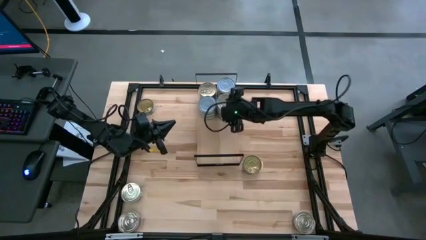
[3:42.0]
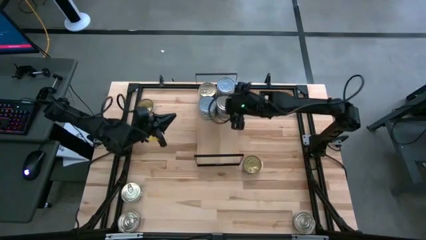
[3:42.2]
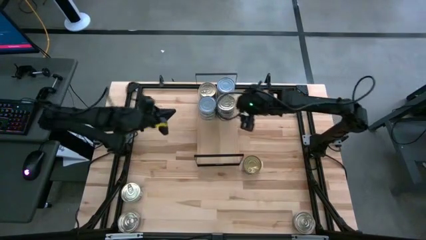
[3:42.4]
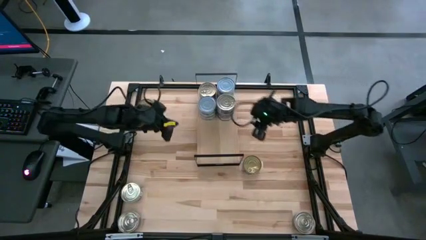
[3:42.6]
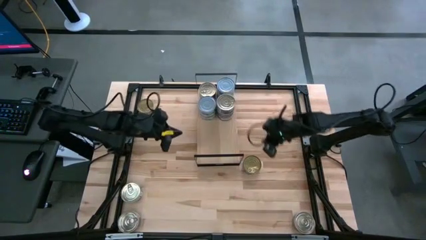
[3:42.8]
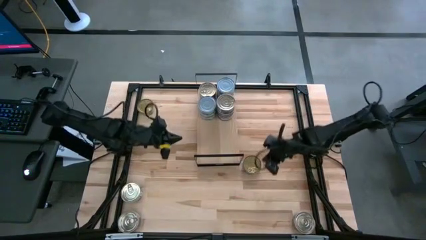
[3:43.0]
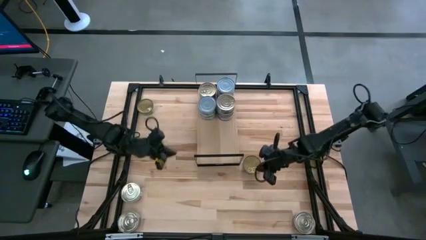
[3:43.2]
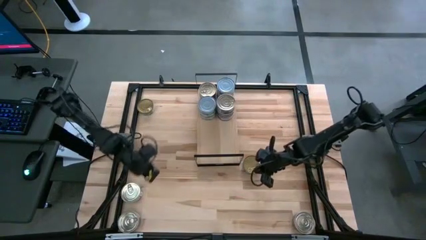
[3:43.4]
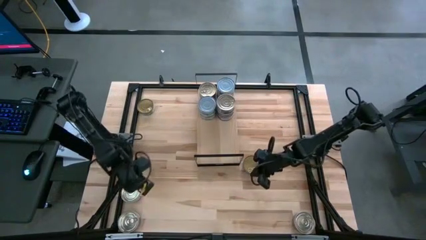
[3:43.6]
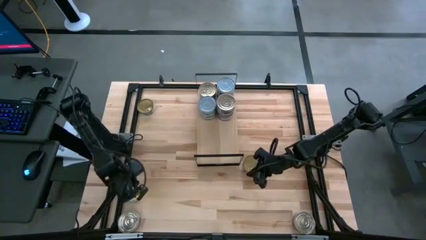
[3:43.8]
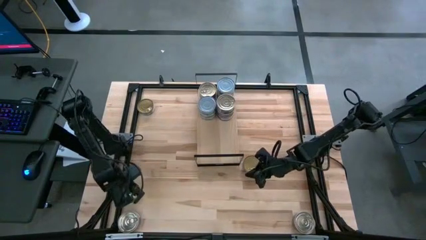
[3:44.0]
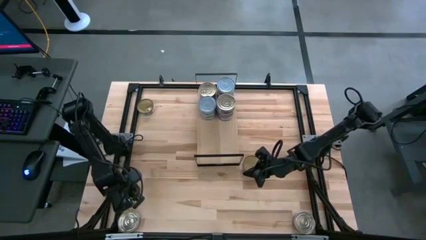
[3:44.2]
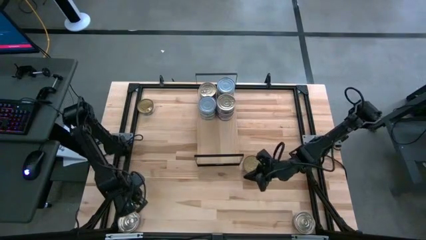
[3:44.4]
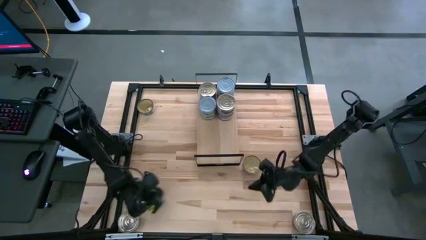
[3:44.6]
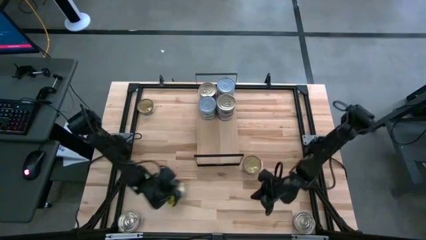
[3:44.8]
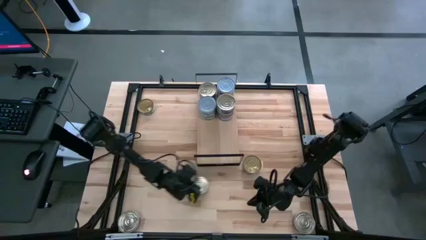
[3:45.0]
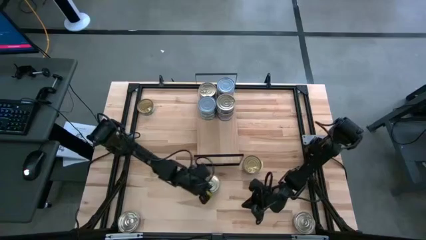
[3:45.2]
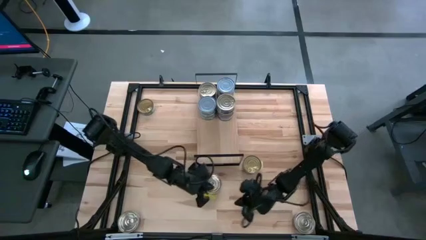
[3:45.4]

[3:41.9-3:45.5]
Task: Stack canned seafood by type on shelf
Move the green tuna can to the bottom middle of the table

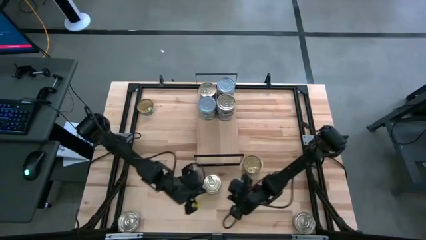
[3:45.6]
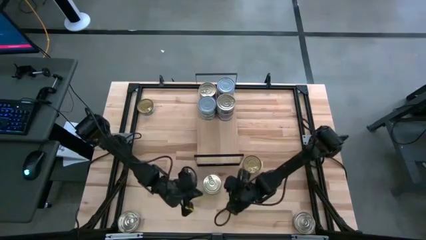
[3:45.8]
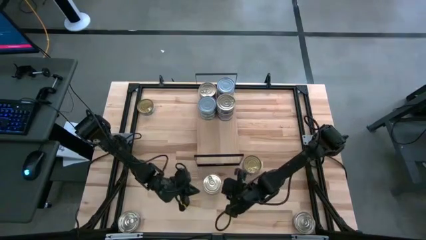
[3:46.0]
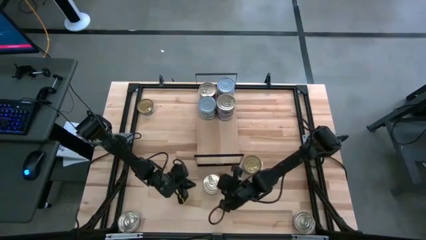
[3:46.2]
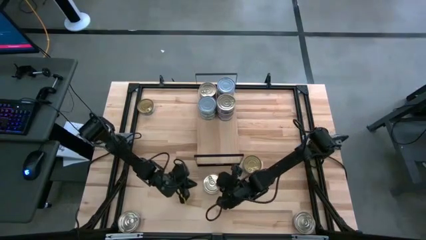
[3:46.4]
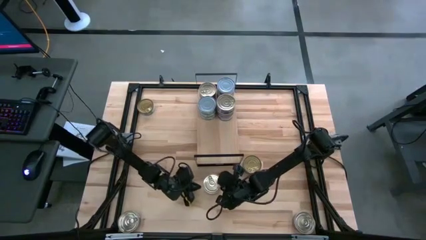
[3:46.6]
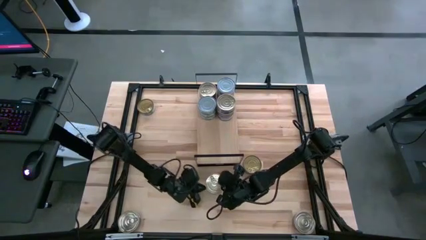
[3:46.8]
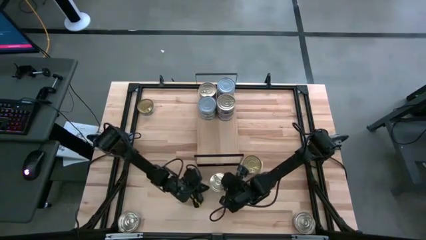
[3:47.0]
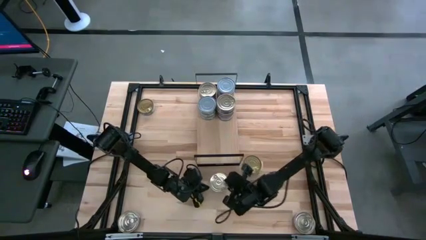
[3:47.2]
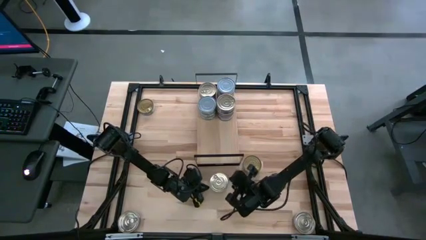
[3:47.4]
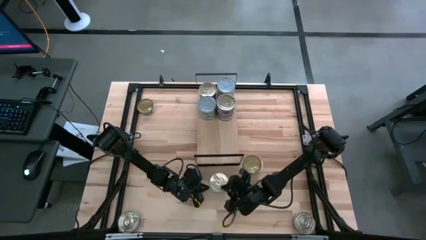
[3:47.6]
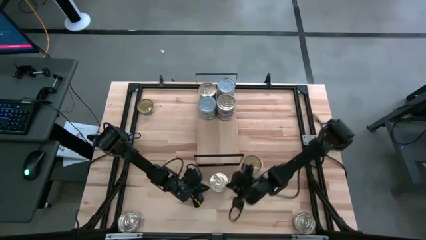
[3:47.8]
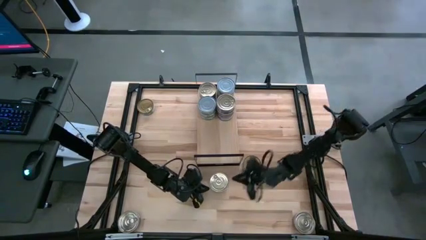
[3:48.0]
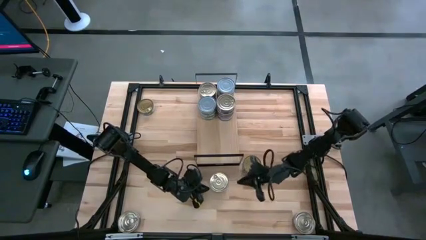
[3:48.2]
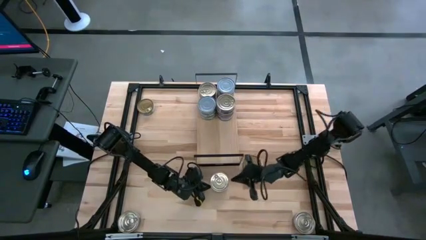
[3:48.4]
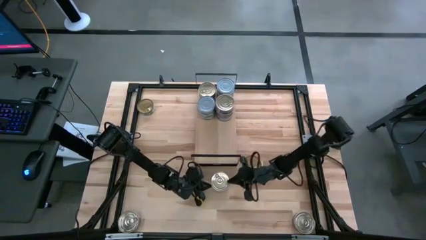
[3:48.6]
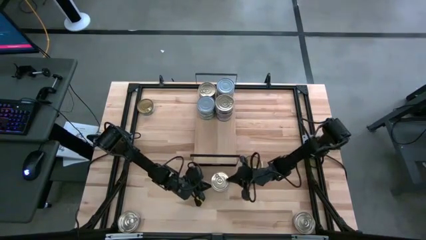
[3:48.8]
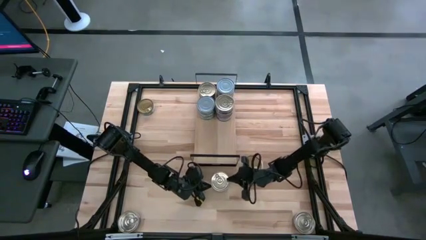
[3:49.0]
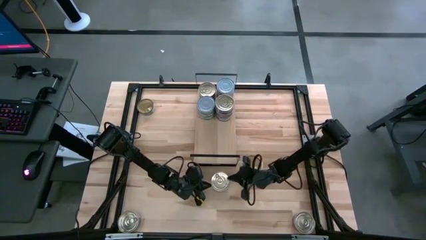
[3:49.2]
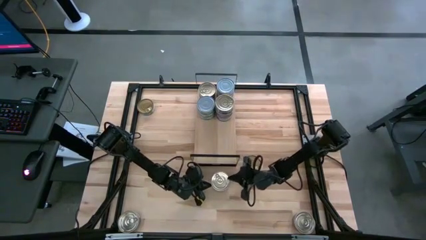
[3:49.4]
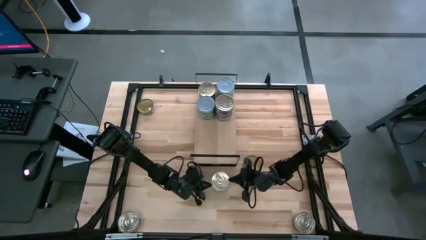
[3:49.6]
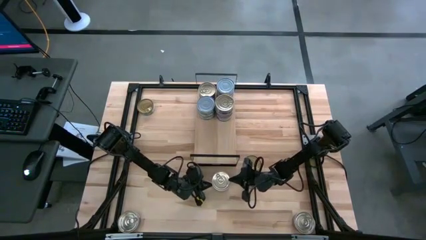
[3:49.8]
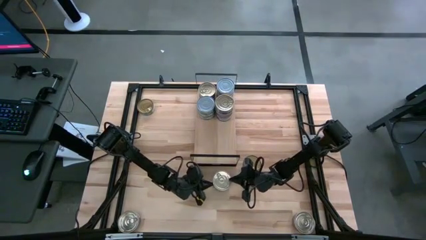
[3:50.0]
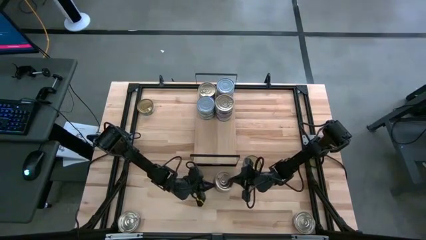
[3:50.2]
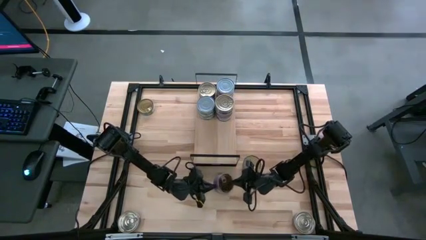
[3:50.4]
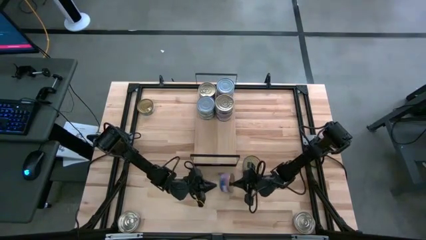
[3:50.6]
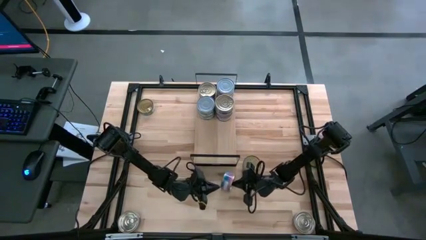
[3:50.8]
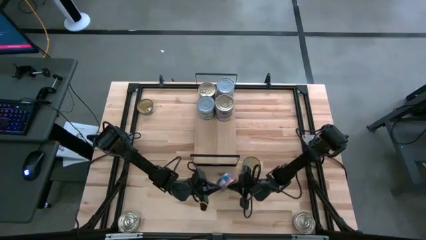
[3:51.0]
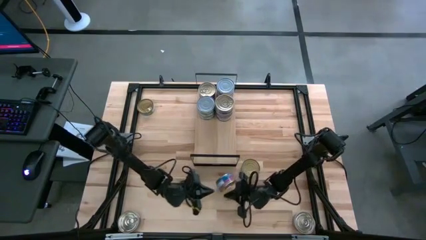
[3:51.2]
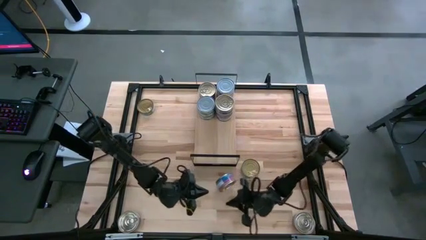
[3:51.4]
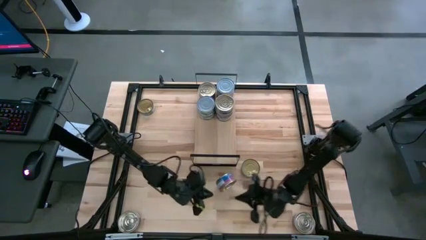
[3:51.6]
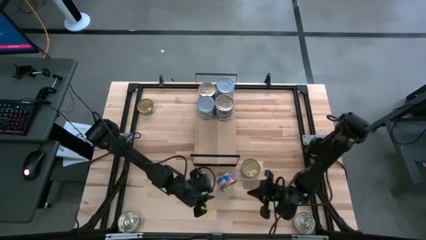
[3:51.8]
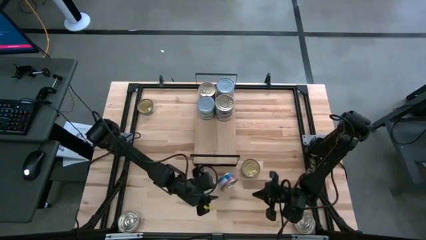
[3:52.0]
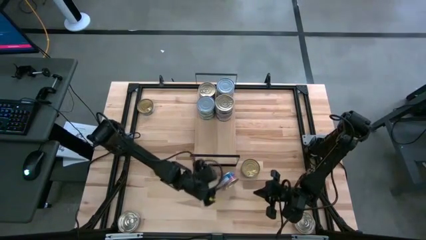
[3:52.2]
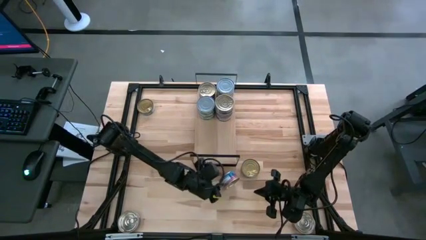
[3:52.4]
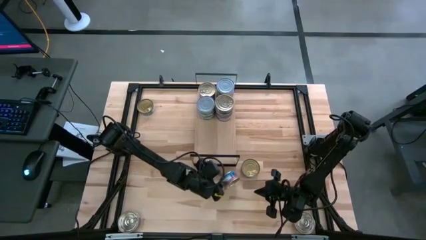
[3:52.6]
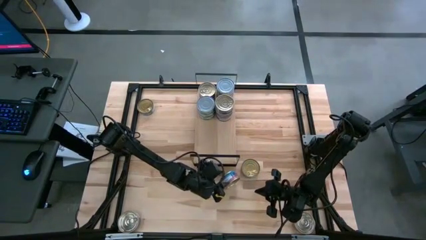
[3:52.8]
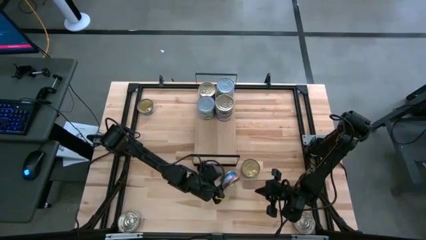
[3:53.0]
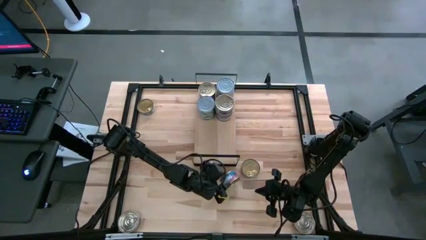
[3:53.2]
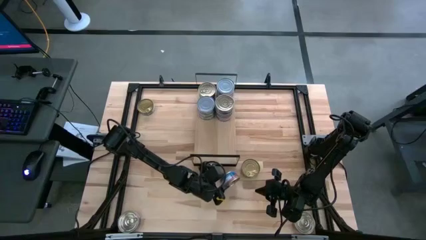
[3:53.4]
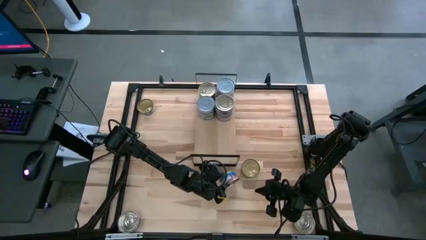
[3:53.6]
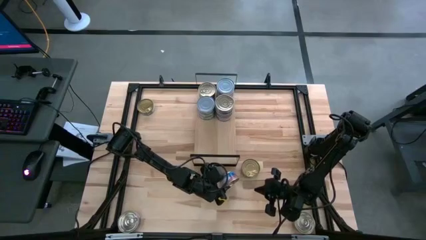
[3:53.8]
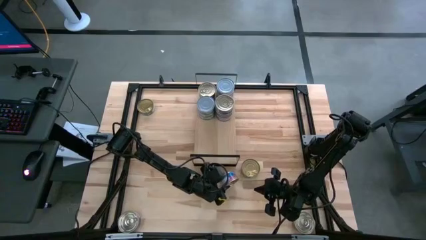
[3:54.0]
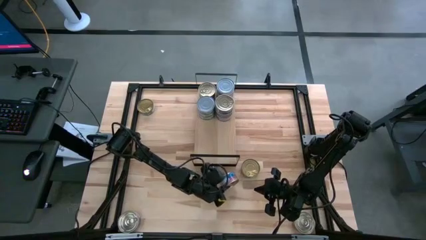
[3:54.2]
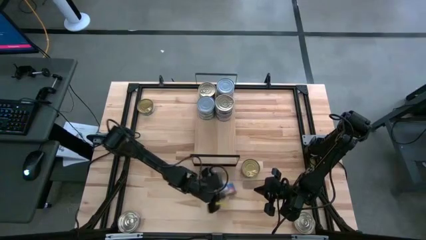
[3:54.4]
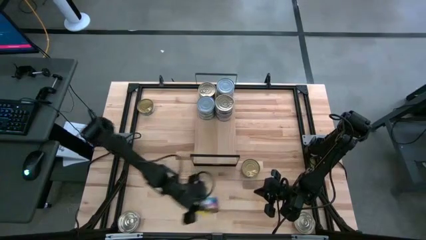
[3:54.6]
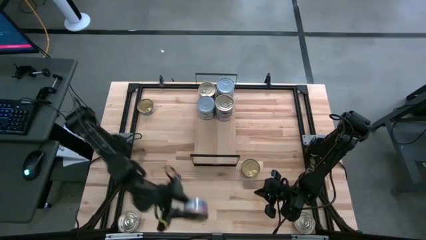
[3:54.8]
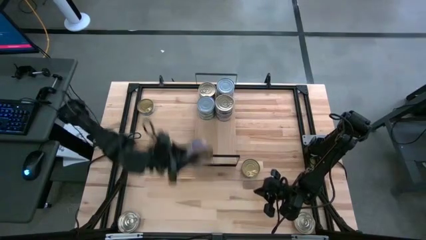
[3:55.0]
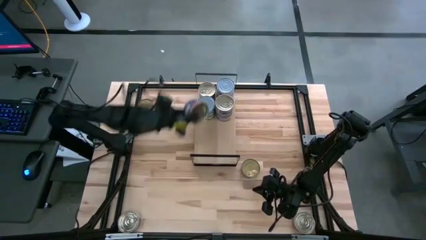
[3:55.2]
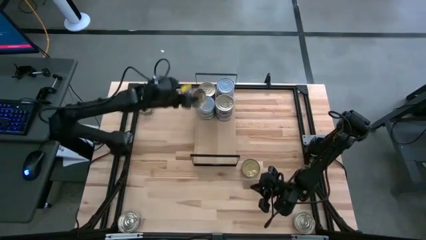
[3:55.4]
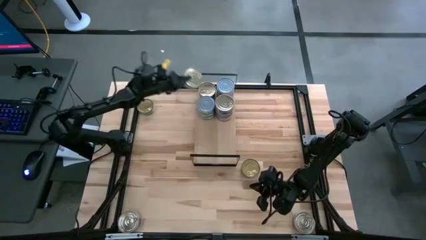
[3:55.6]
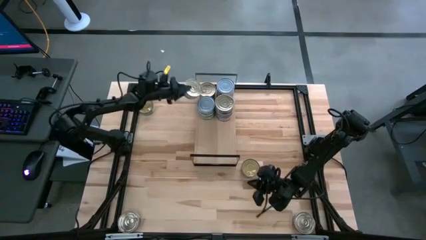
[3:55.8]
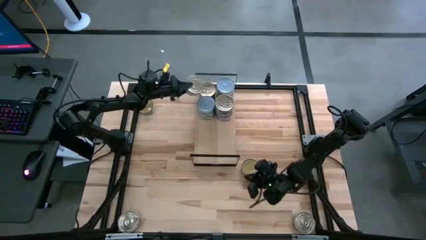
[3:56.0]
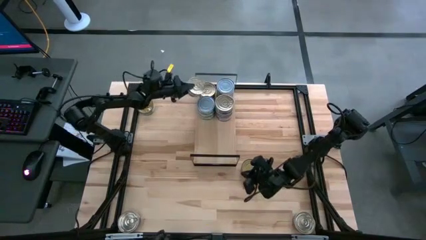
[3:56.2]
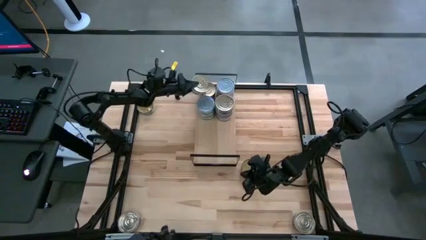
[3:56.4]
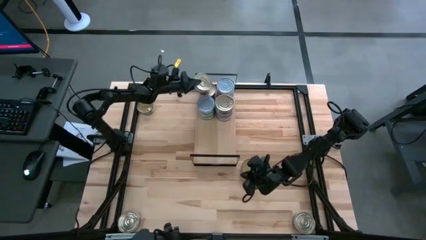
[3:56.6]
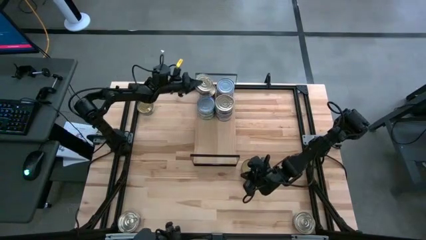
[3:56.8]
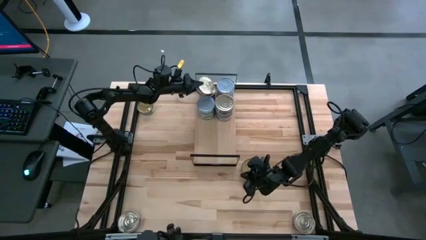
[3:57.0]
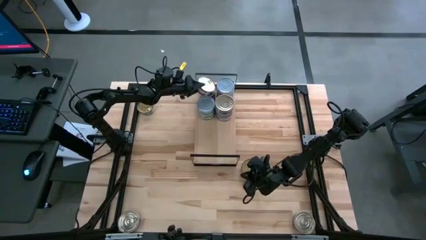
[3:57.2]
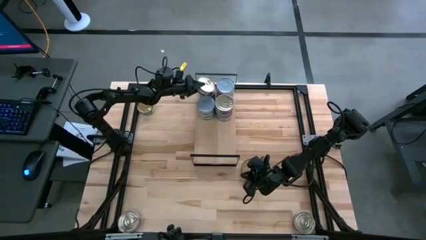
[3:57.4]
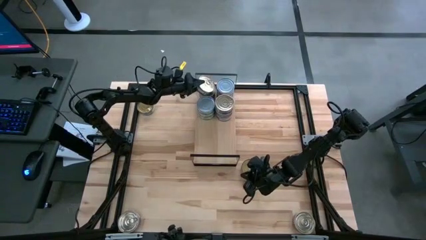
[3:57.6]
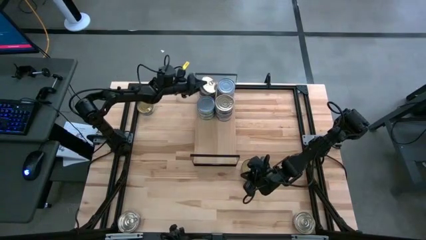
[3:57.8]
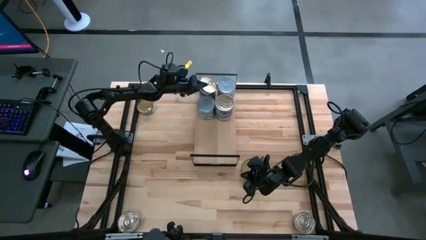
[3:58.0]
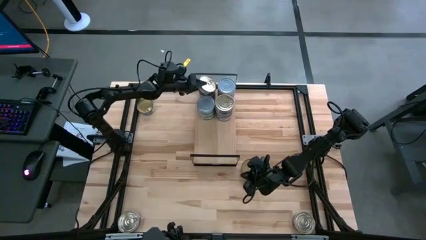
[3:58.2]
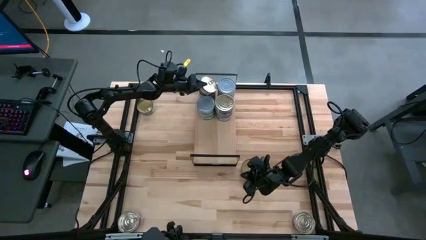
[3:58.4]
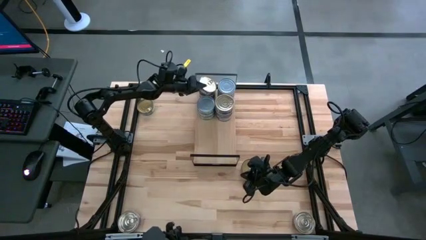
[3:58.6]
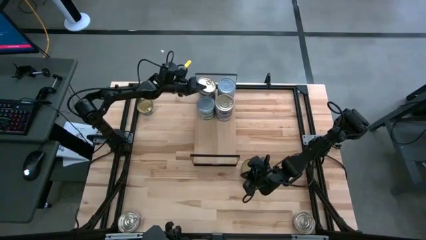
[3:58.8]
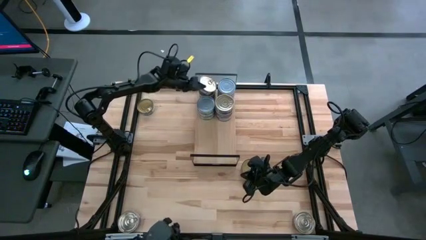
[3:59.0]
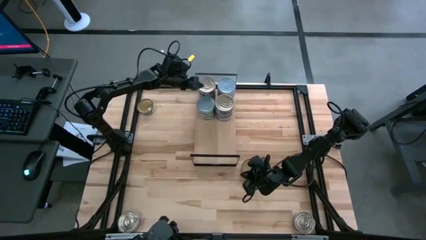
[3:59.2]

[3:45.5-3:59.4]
Stack the pink and blue tuna can on top of the pink and blue tuna can on the shelf
